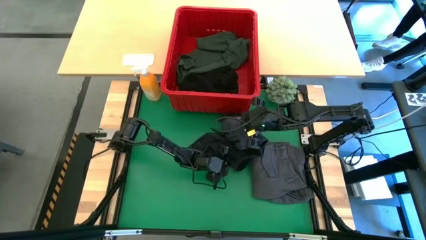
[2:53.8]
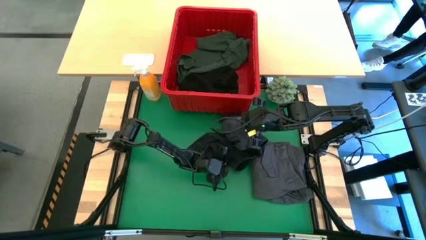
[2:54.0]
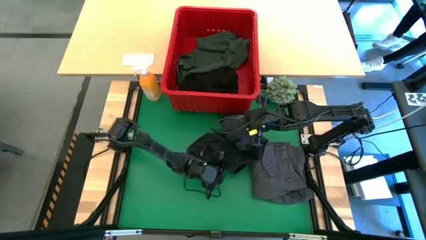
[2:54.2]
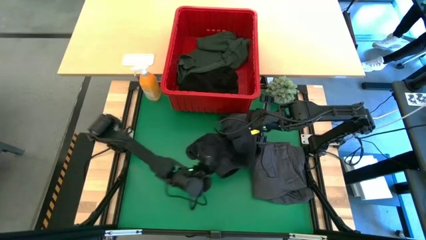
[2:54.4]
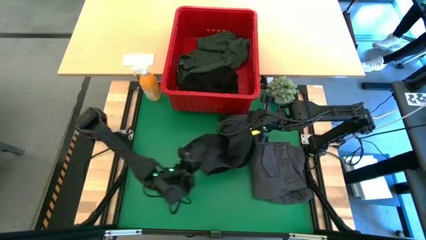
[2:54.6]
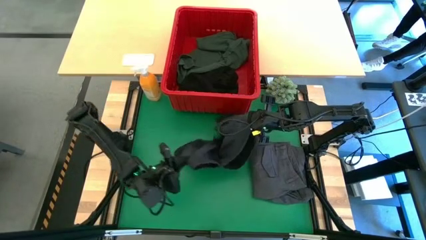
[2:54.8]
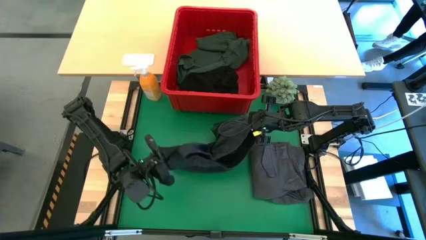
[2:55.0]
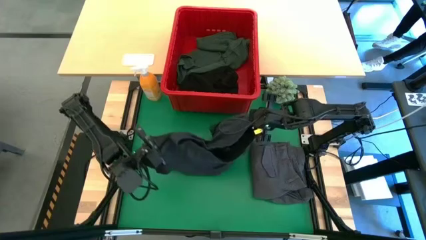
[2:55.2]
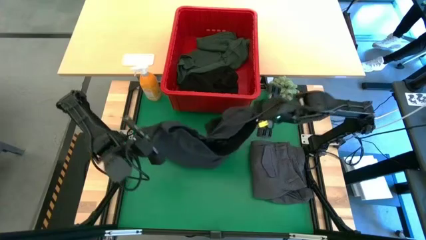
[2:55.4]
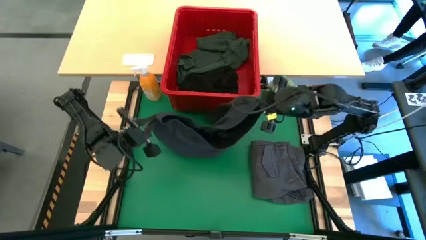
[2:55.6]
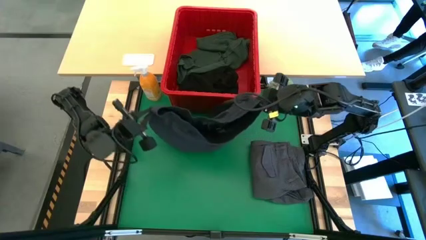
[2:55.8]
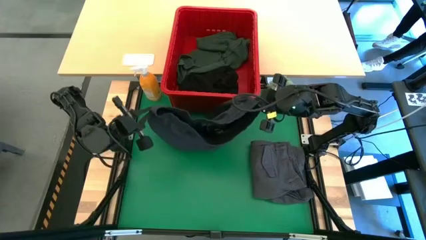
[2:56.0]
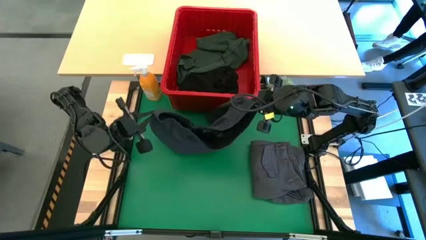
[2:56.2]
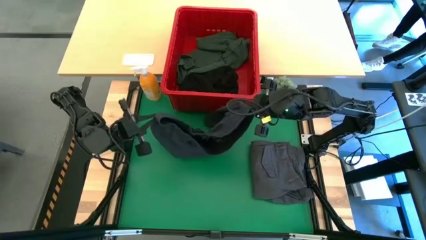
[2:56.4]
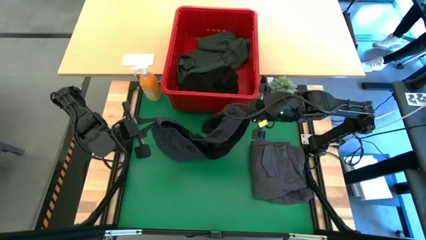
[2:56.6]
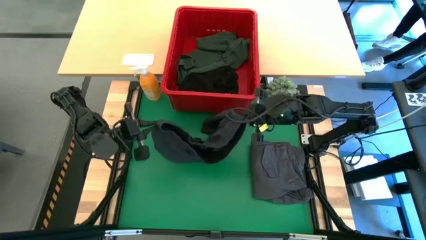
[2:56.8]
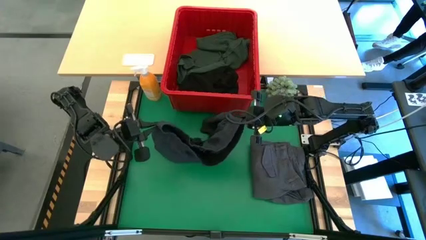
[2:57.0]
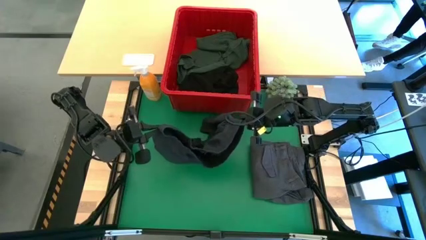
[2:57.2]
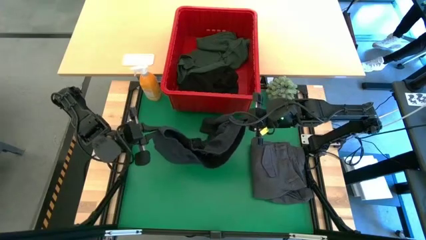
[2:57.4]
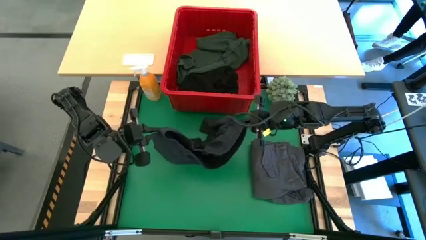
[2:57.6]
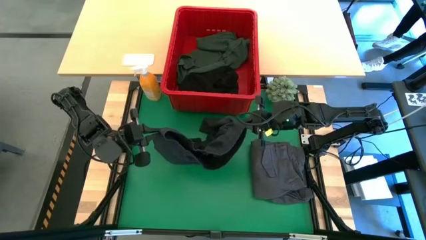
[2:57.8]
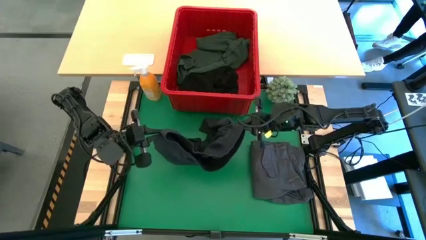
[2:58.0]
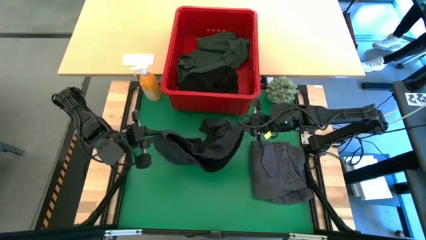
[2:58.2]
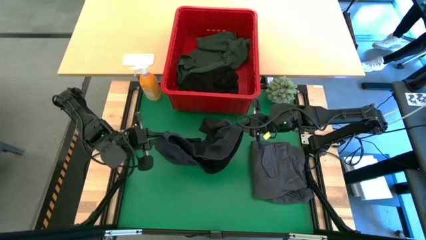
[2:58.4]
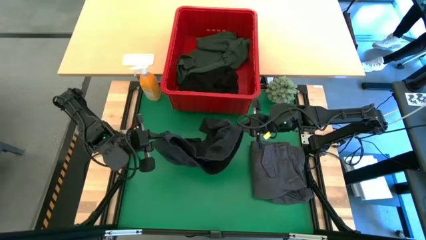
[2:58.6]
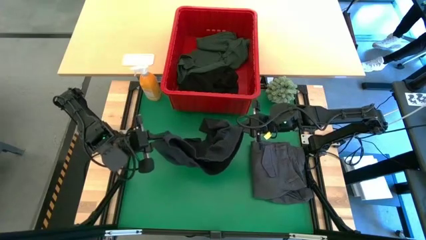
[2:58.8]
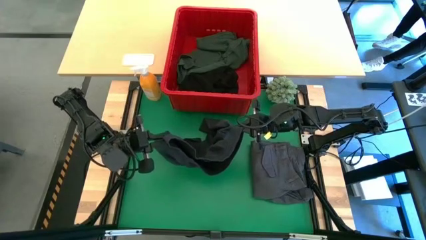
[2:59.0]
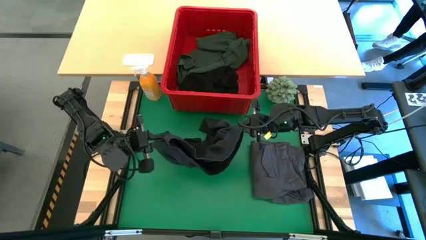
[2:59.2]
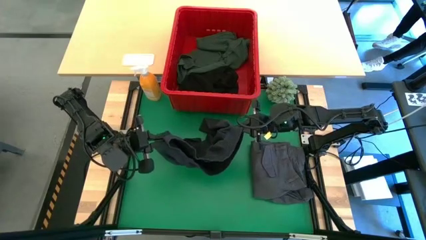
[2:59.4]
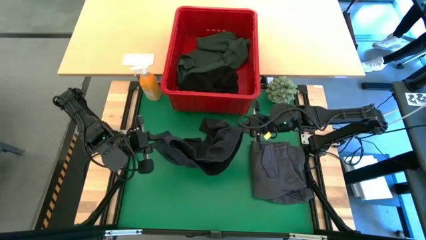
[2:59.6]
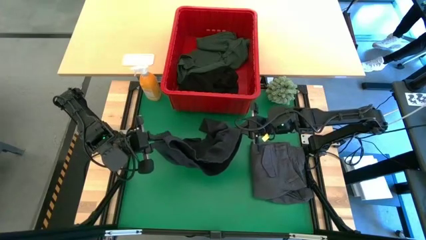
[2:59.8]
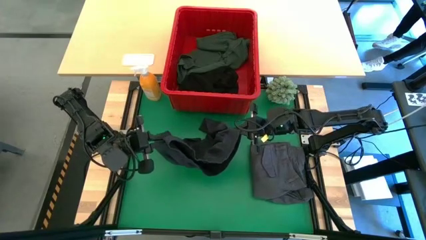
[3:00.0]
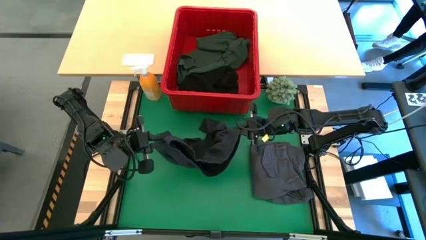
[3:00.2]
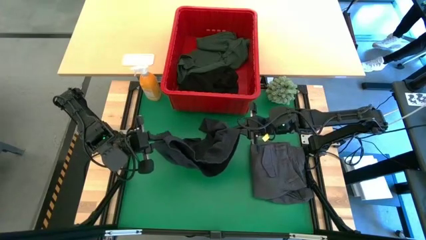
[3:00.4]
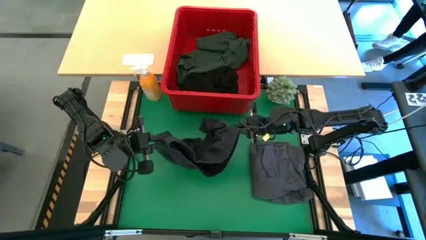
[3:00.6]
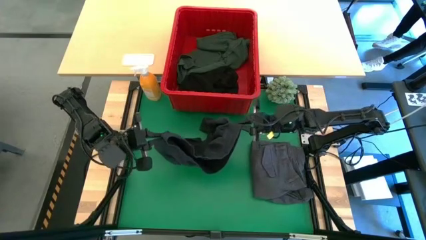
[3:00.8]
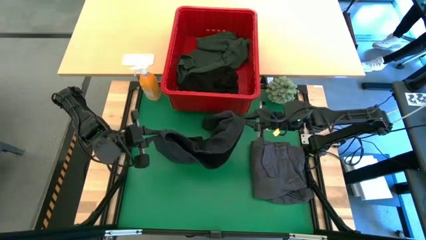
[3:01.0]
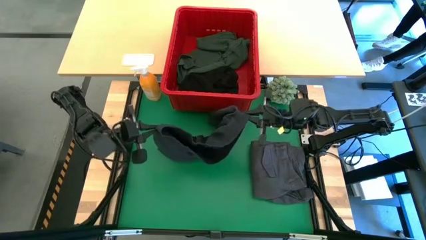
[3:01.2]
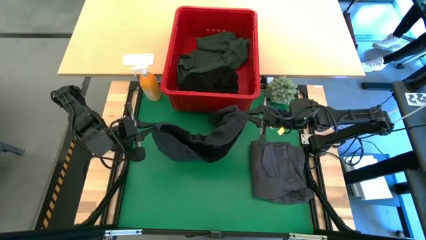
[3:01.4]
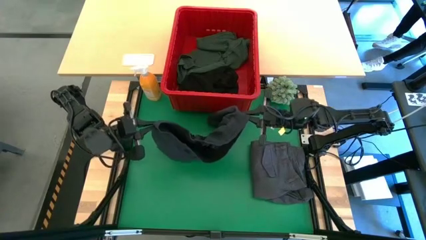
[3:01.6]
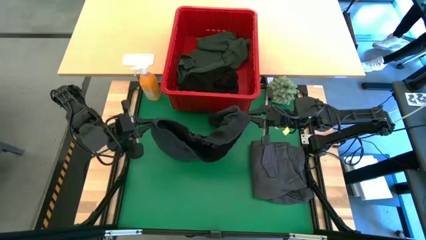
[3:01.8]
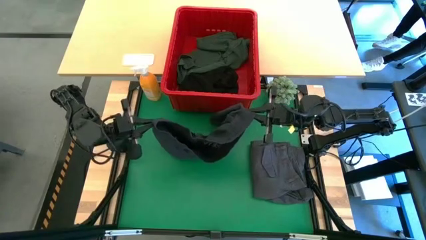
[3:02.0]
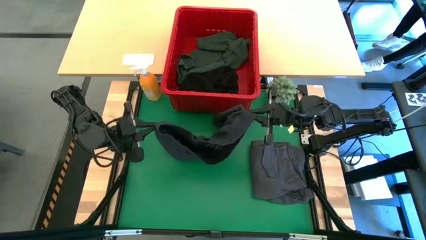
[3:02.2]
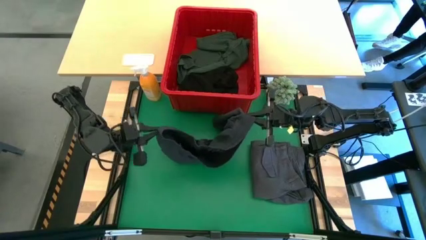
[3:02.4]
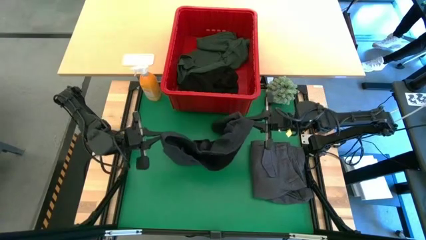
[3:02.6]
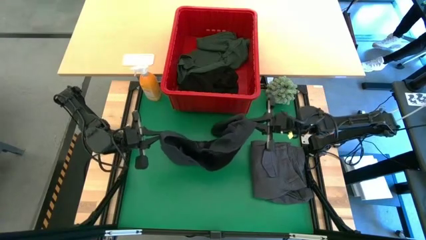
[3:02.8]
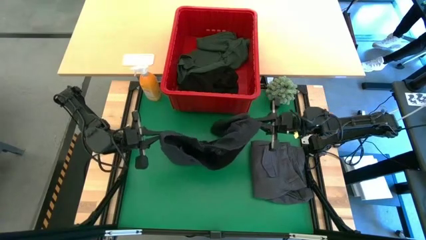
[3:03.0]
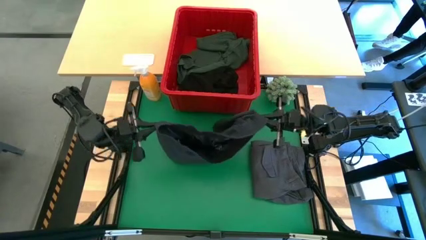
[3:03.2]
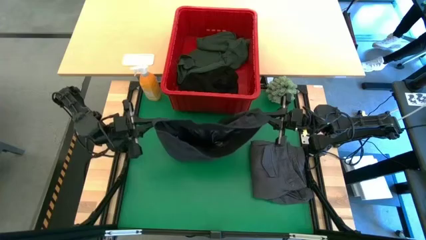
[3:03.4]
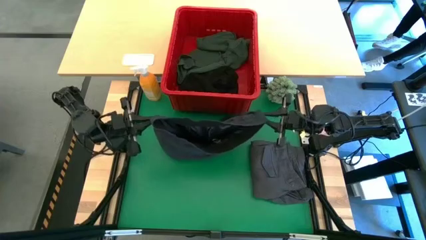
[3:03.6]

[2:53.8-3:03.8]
Task: Fold Laundry from Bin
Fold the dark gray short

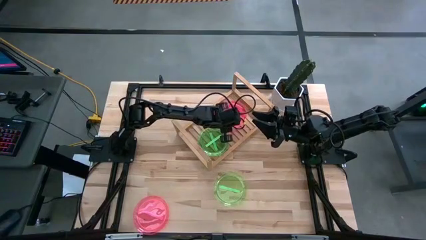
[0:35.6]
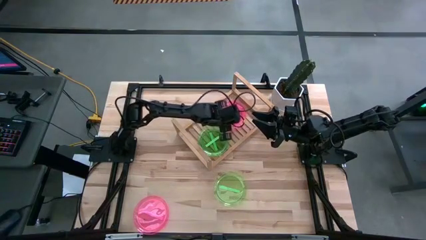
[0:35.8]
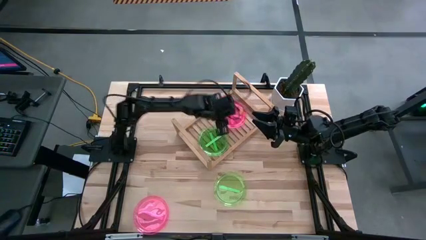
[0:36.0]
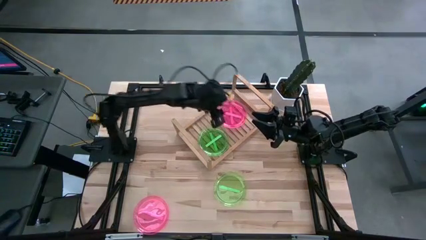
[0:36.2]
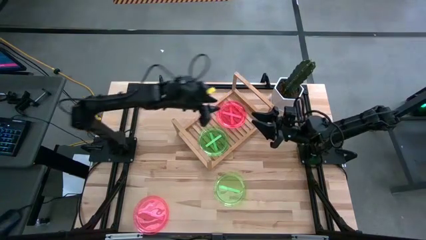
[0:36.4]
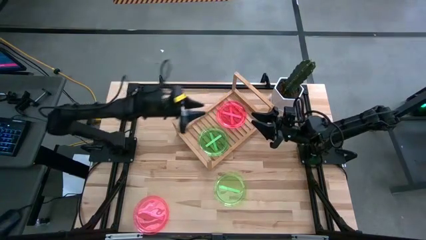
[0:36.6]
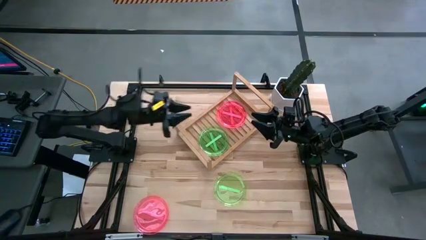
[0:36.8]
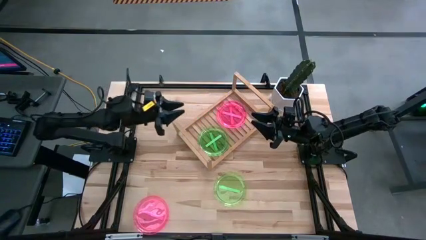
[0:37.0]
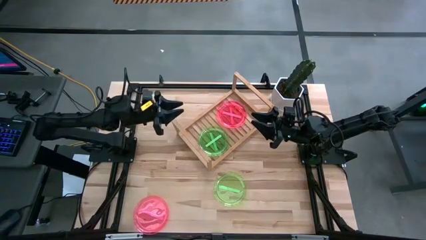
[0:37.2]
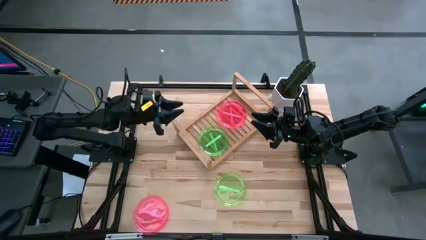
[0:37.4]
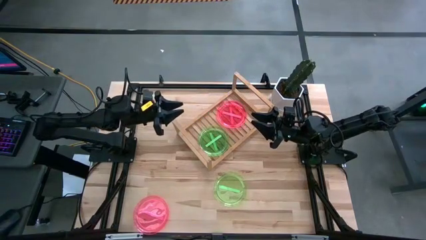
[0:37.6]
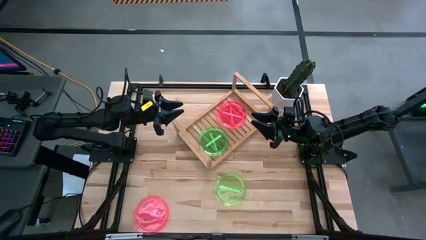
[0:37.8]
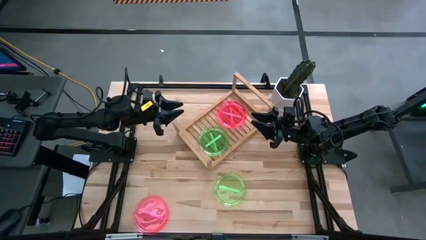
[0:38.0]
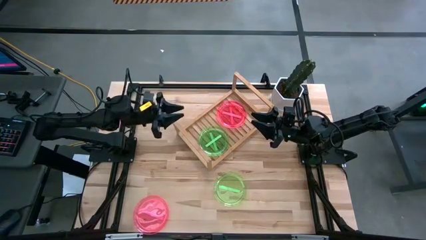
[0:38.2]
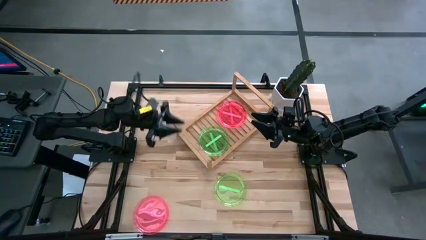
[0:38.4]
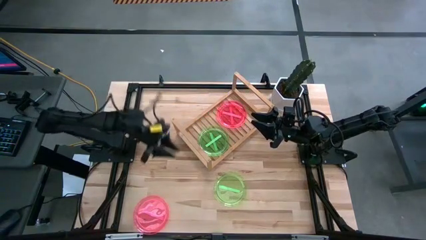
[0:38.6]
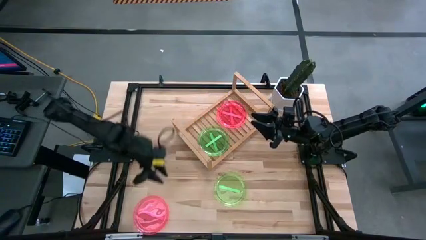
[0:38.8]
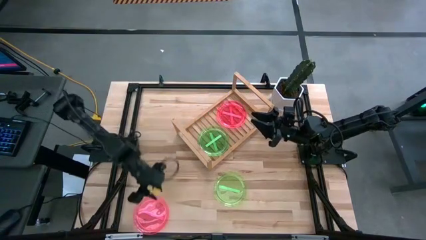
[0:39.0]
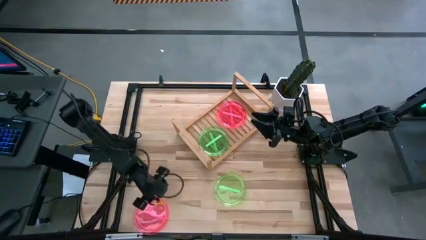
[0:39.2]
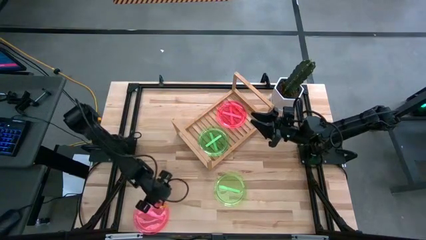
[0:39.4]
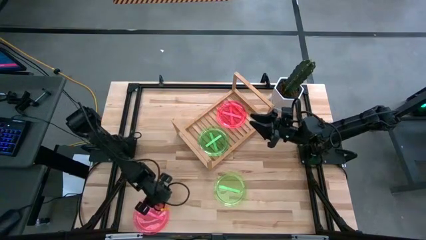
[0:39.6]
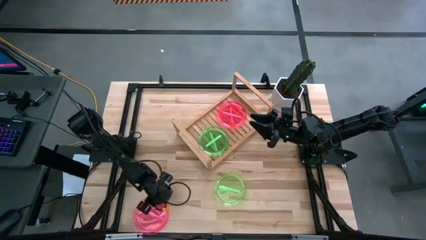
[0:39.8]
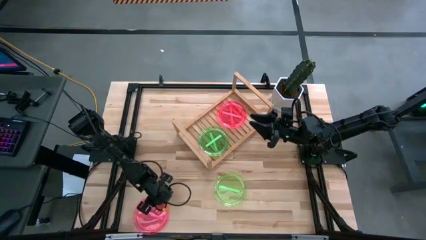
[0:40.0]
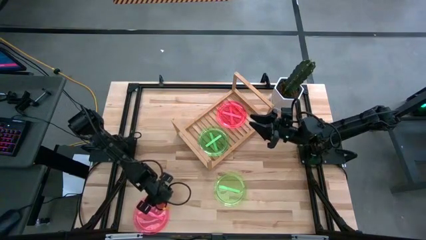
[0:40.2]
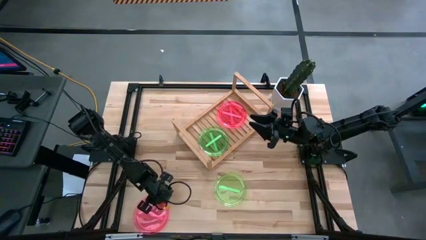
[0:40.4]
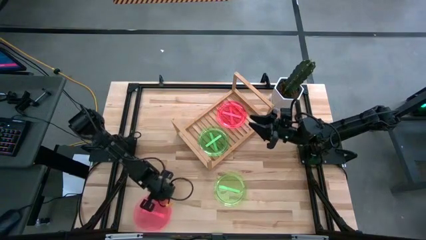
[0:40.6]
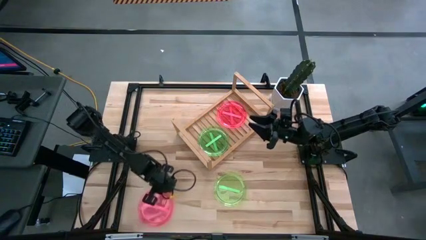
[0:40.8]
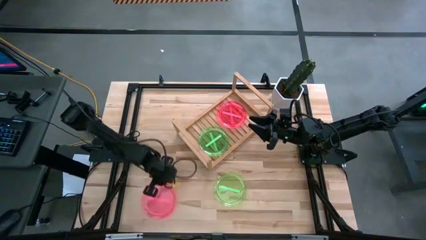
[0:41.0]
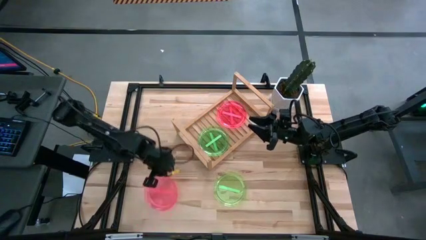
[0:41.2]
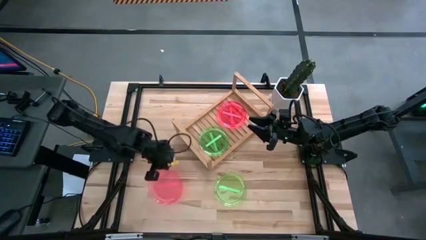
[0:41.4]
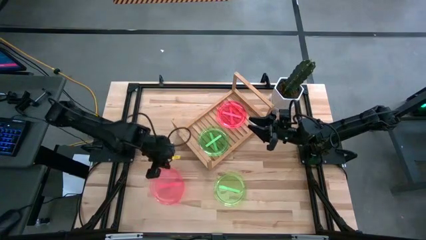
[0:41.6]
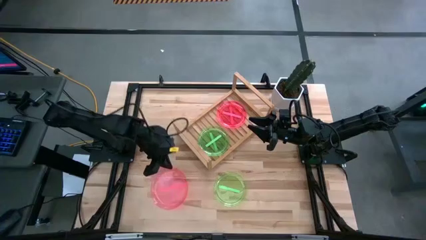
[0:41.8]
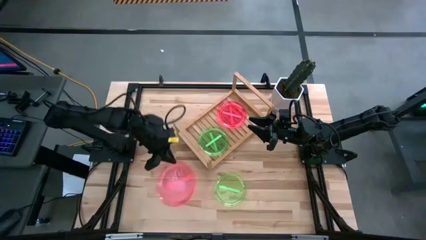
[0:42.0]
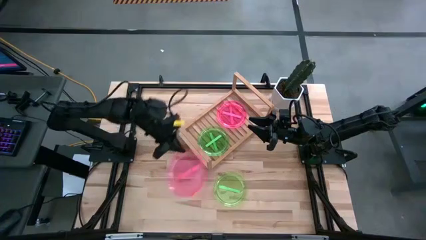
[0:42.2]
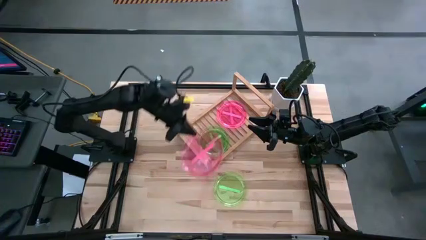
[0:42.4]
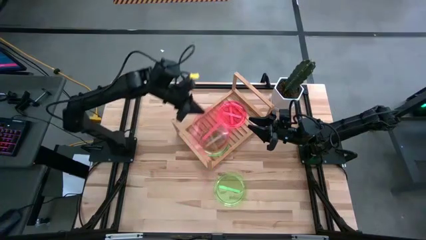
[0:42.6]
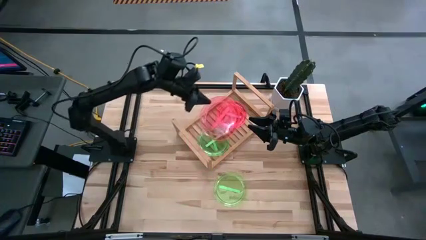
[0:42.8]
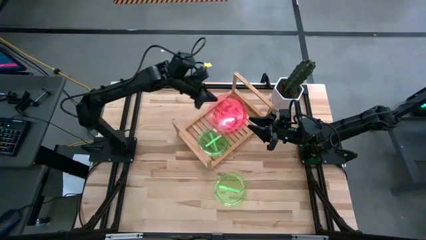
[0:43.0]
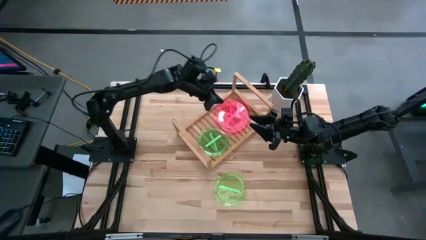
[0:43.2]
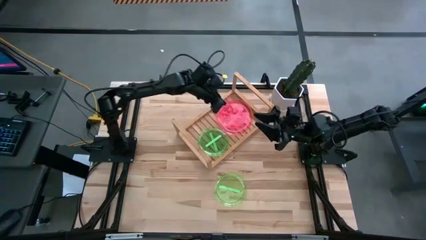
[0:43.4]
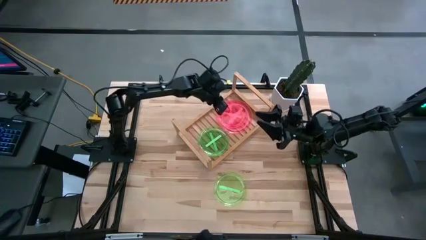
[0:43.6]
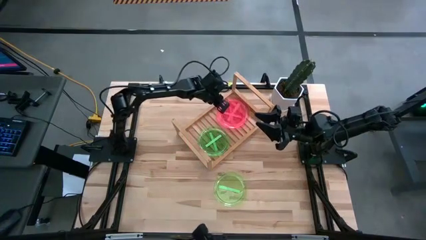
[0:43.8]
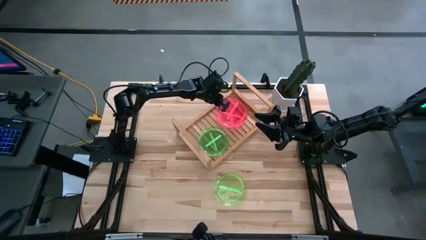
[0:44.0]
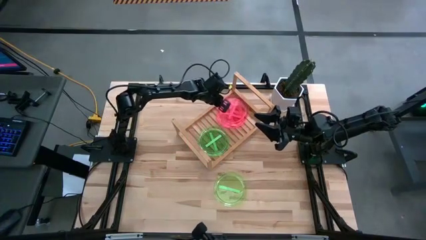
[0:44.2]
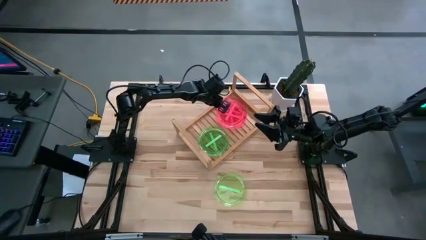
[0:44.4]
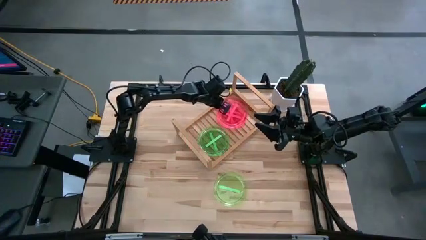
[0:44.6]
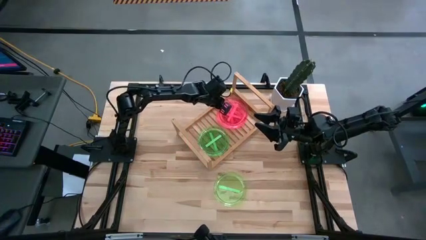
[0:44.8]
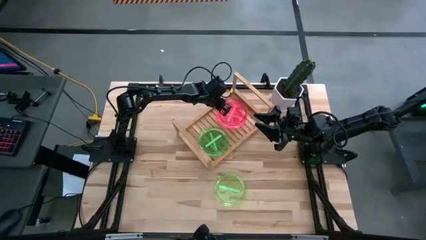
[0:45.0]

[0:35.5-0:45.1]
Task: Place and stack plates onto a shelf
Stack the pink plate on top of the other pink plates on the shelf
